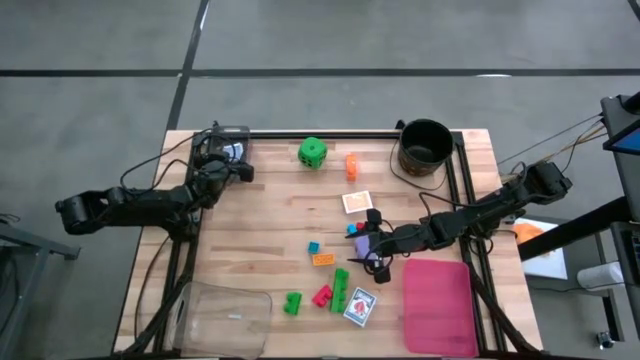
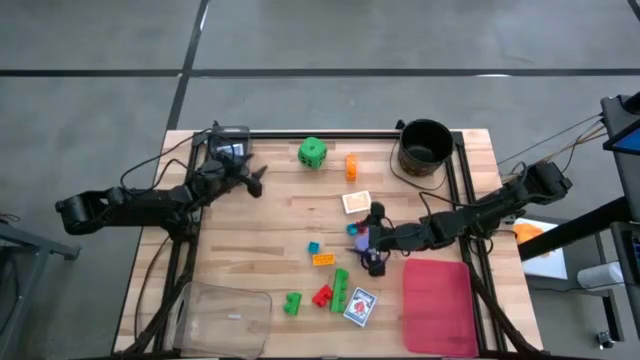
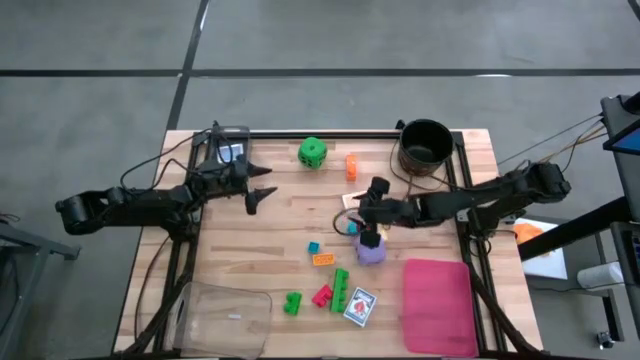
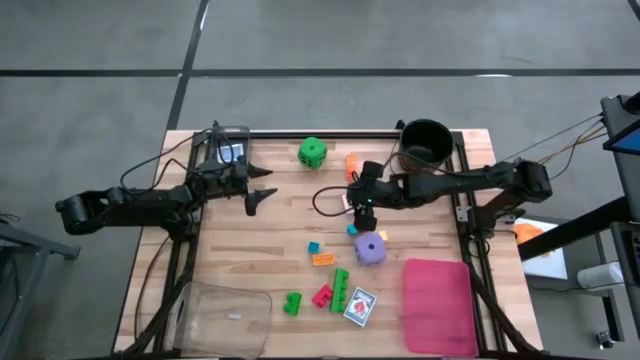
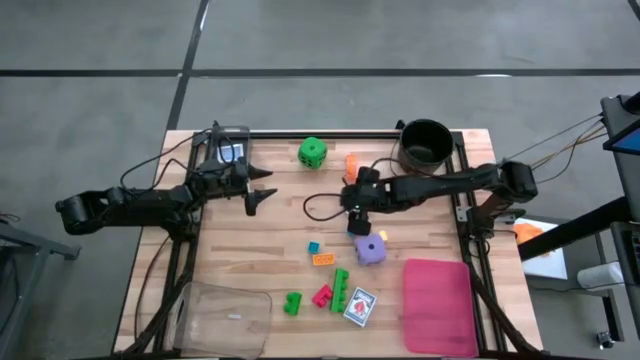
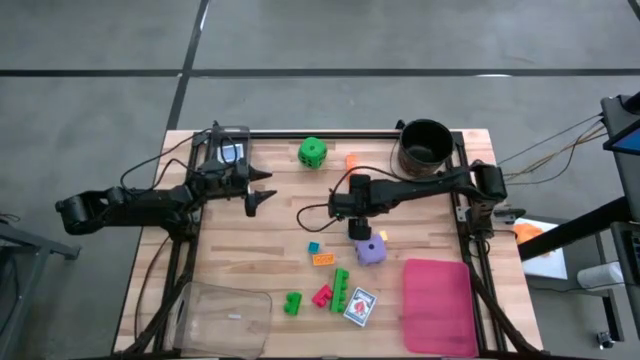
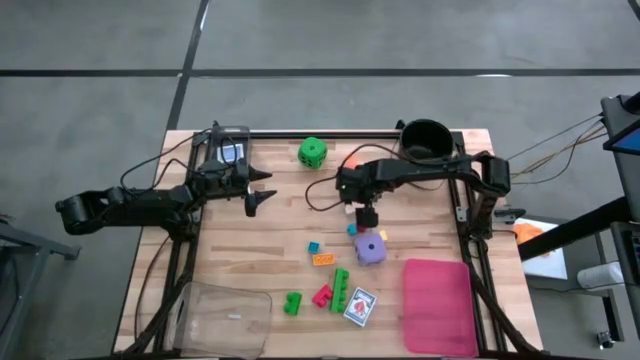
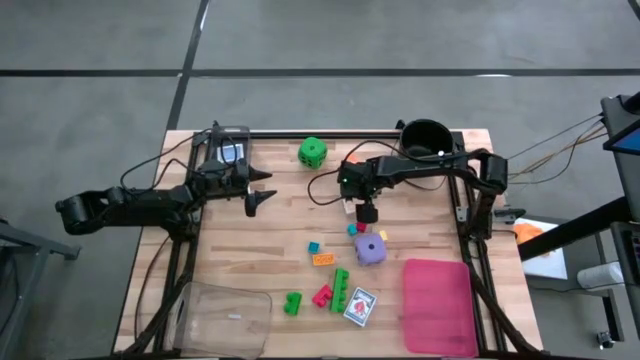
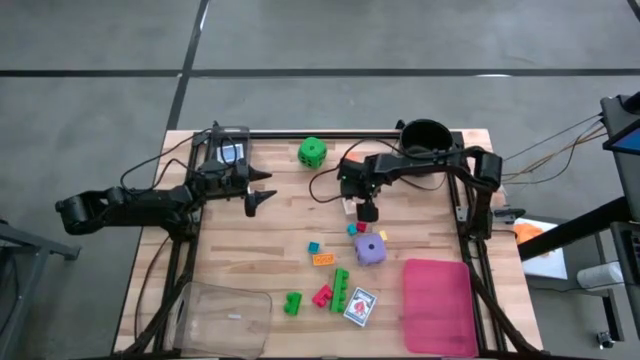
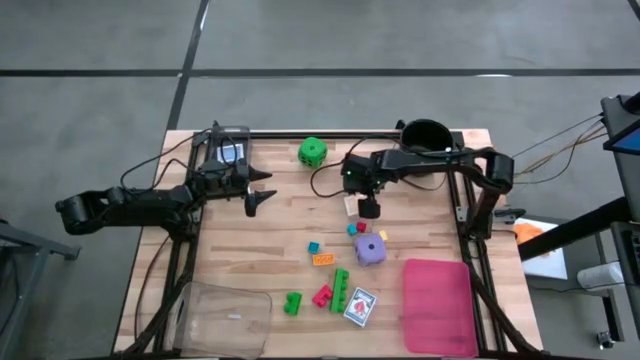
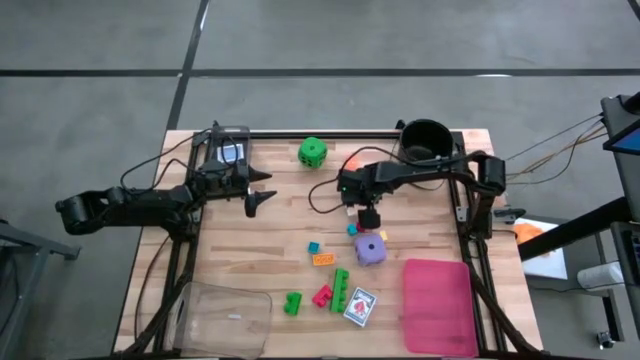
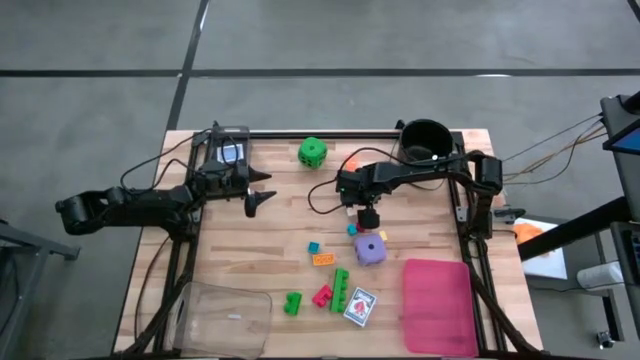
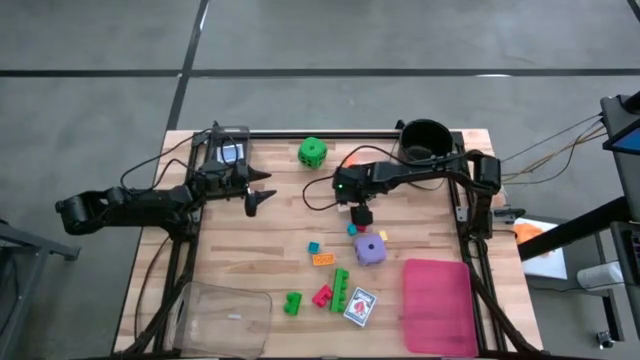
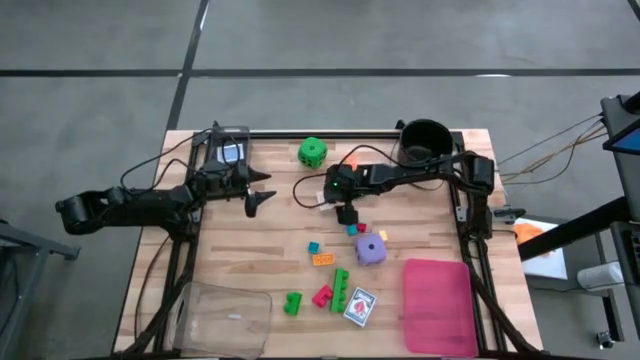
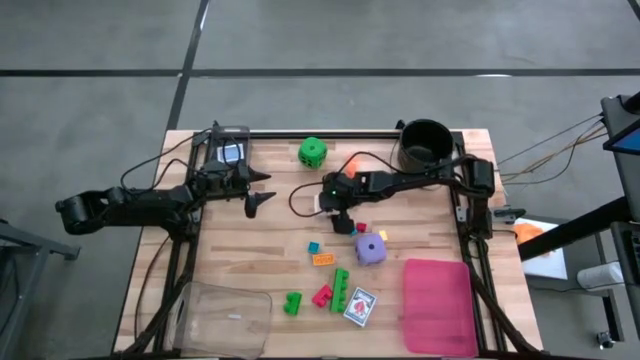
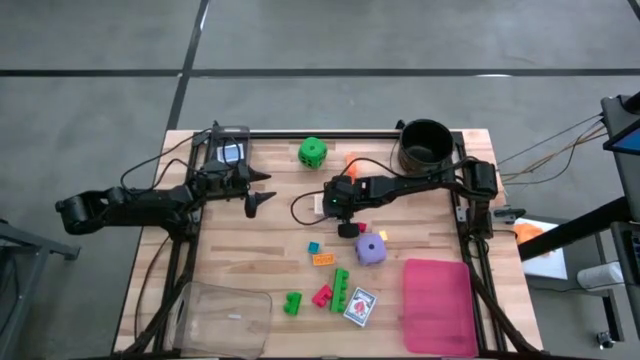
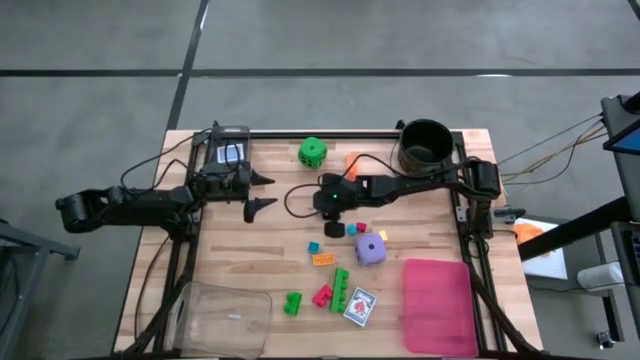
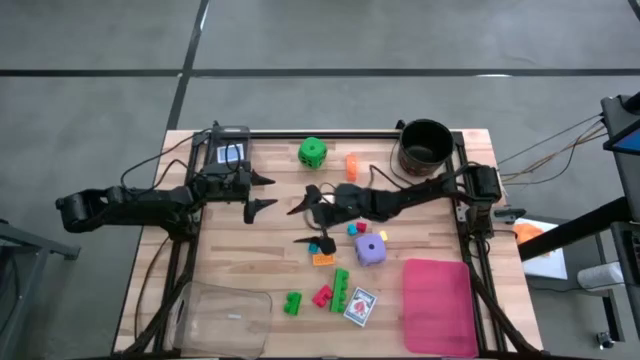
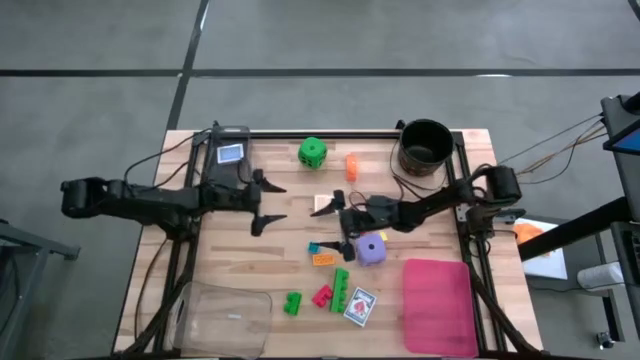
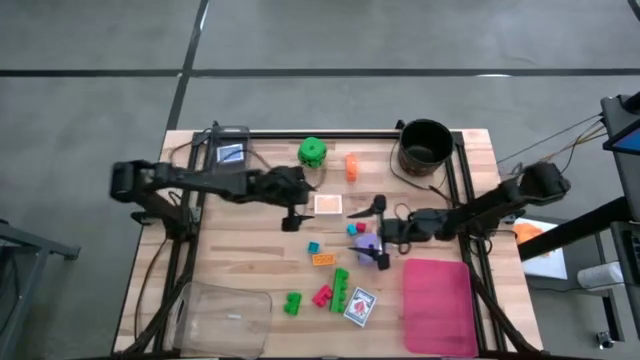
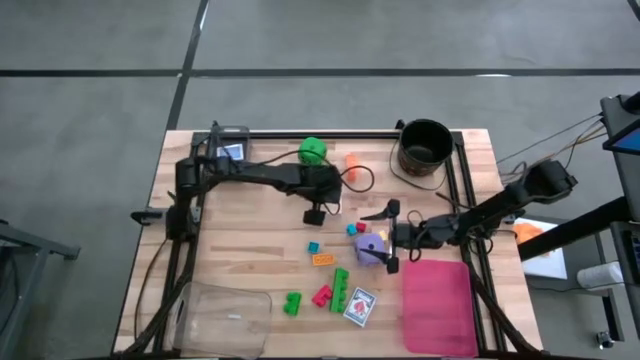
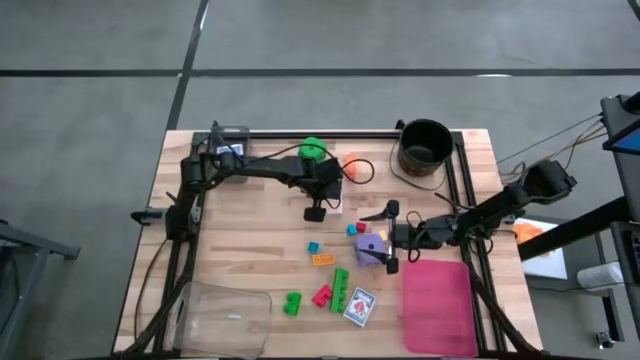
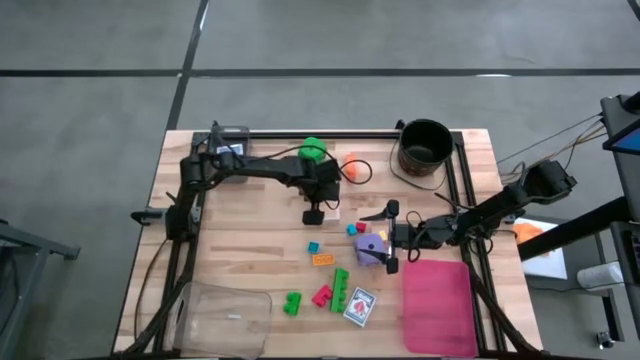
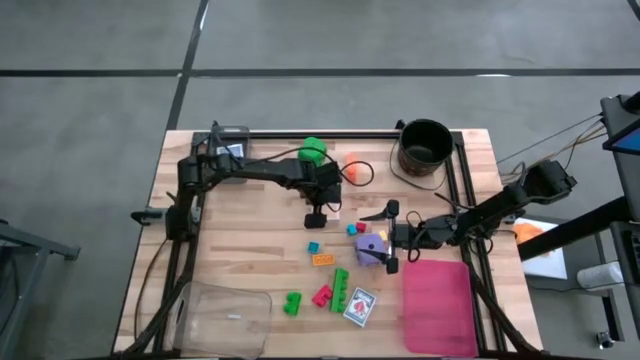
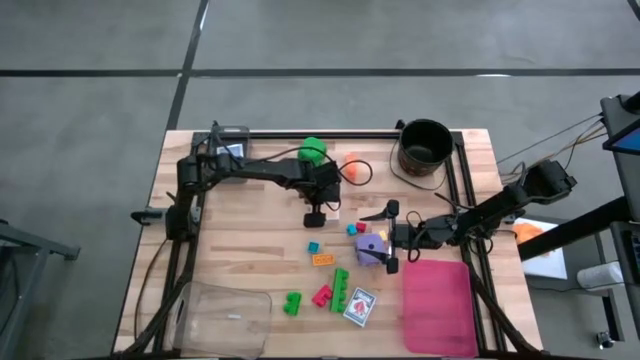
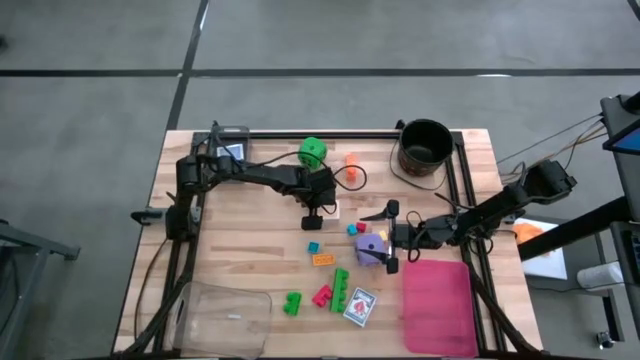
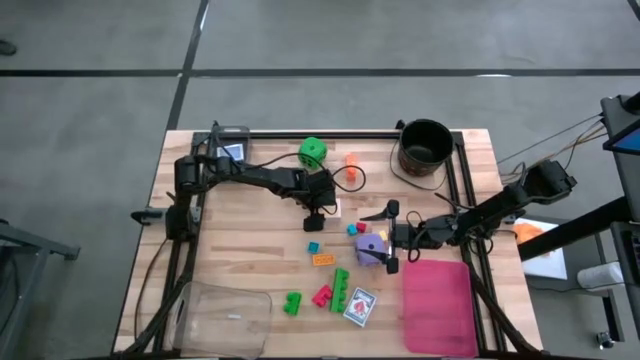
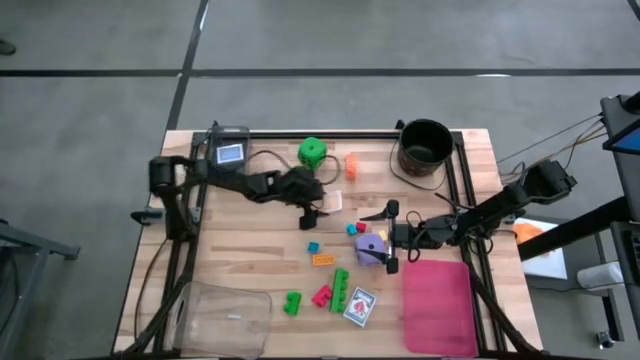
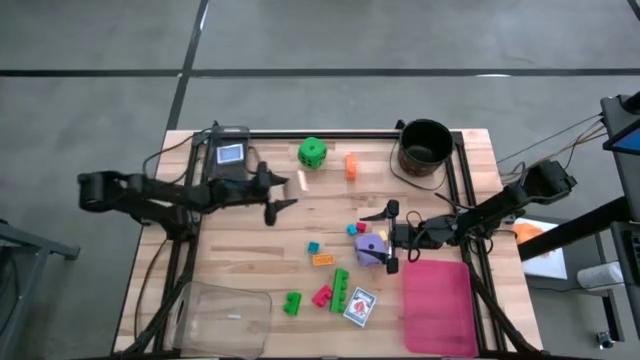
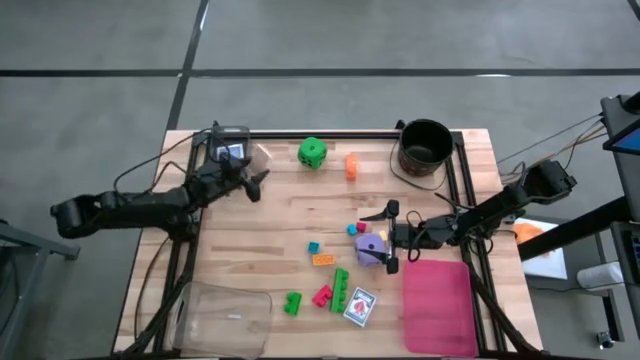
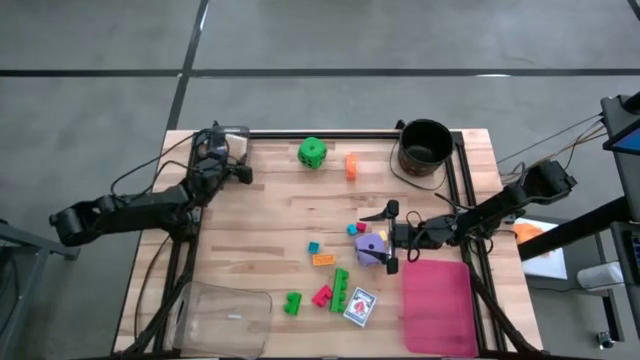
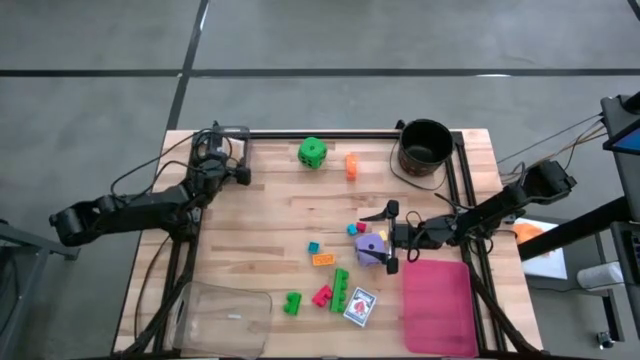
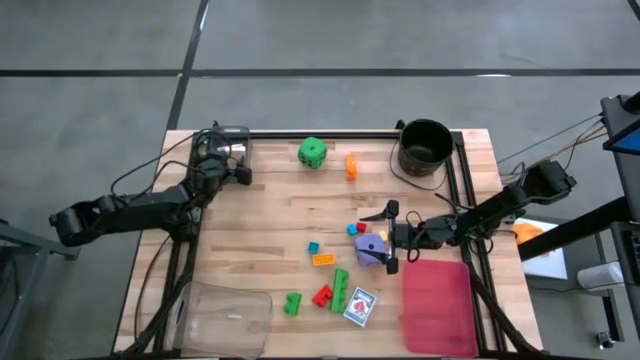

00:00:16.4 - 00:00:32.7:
Task: Pick & Place Toys
Put the orange deck of cards into the black bin

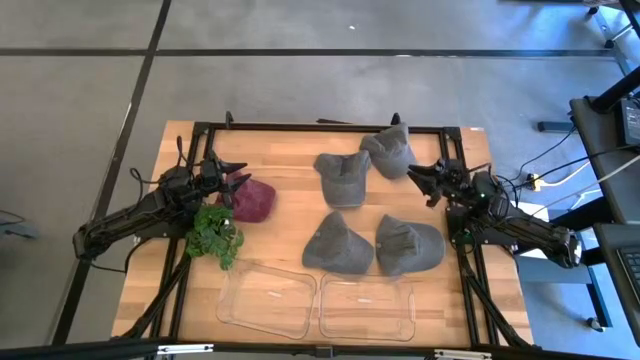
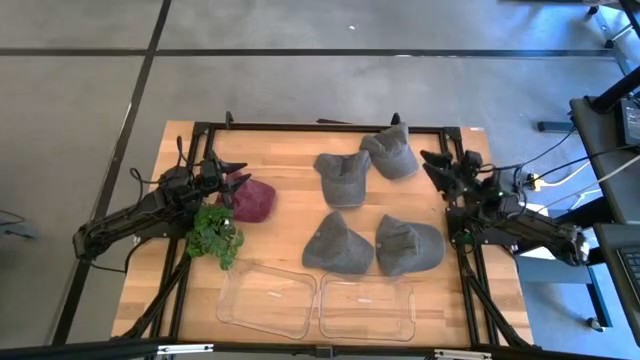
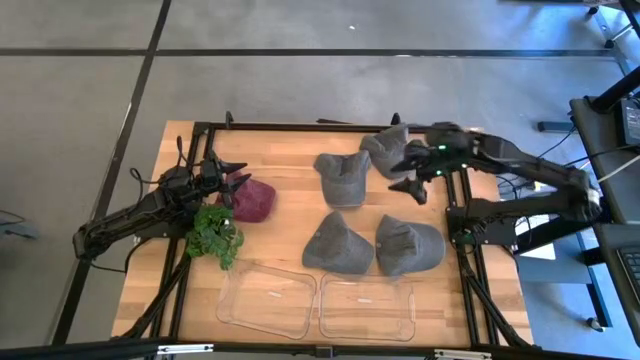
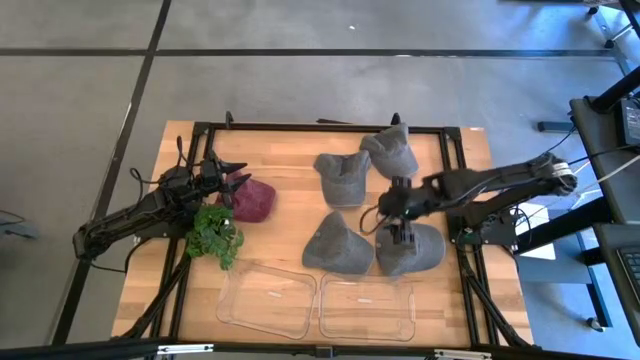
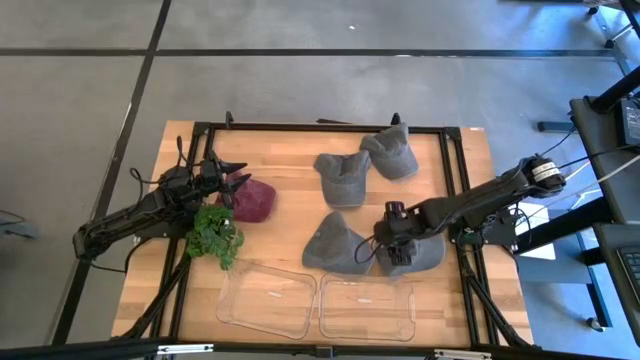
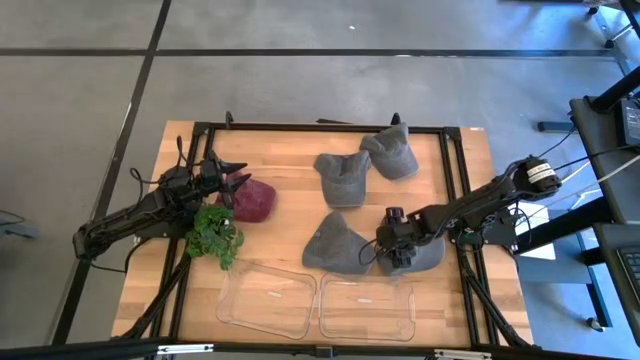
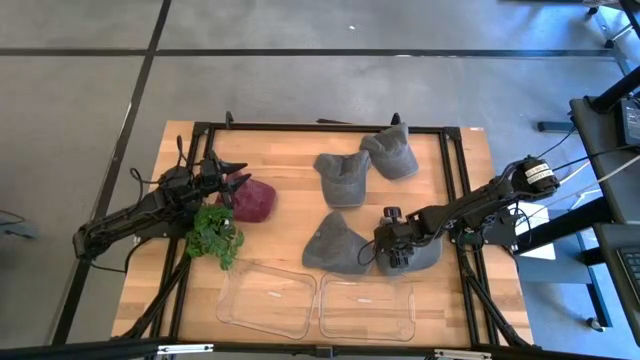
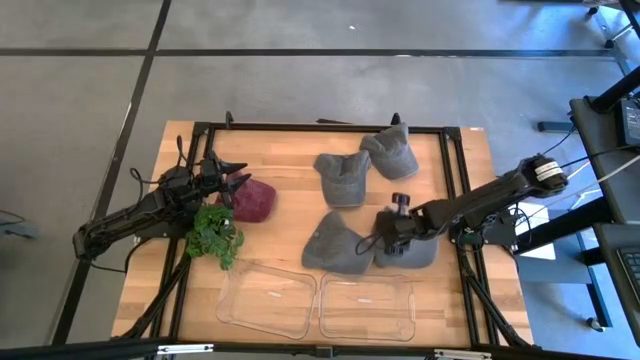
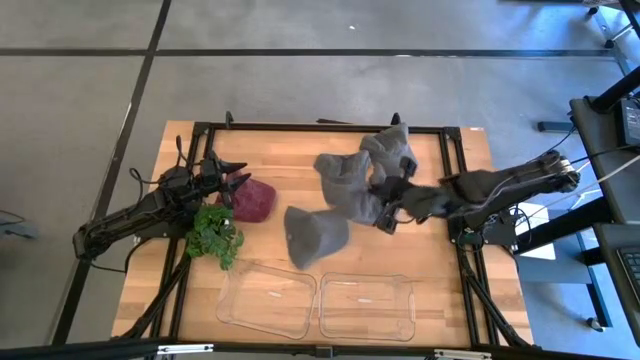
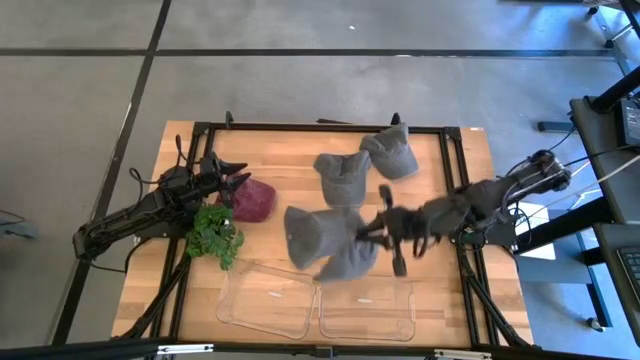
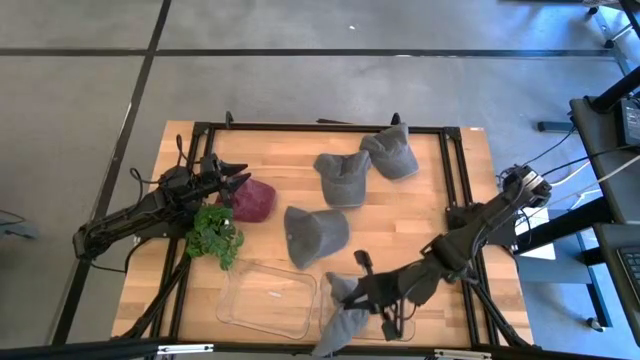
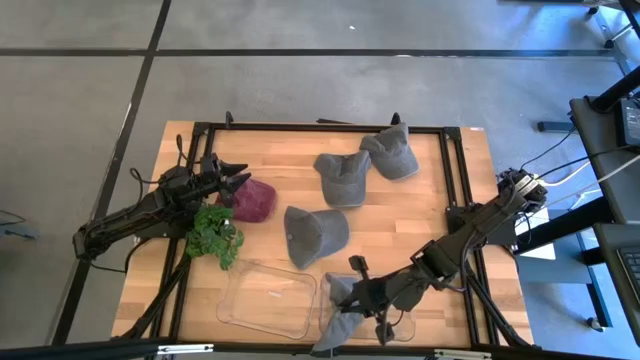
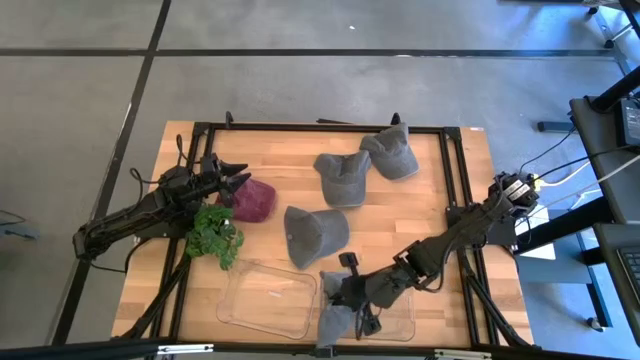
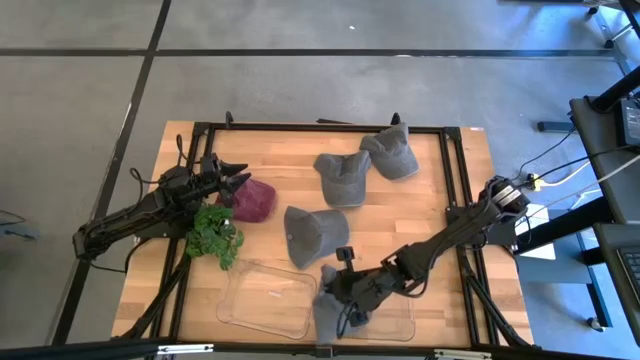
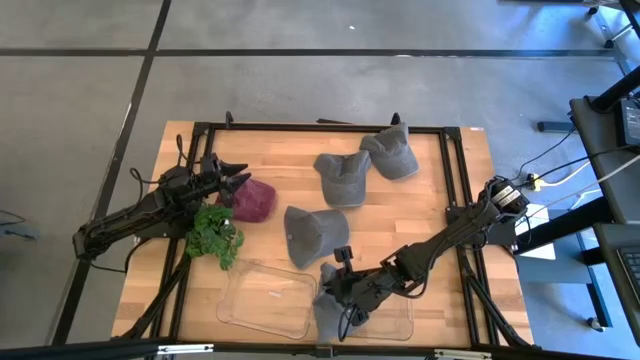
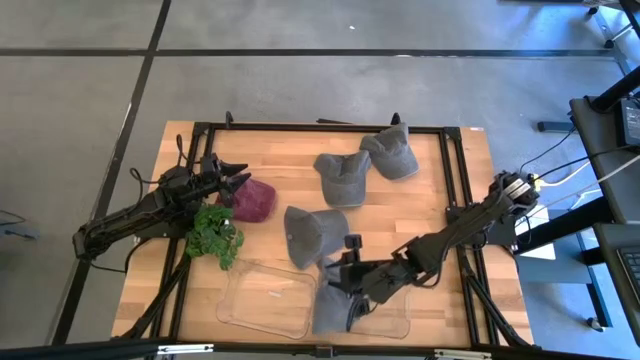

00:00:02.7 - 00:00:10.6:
Task: Pick & Place hat
Put the gray cap into the right transparent bin
